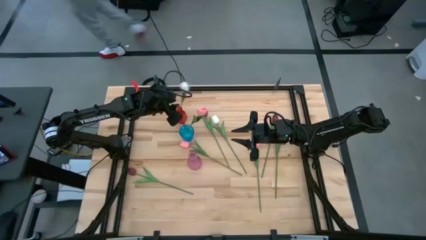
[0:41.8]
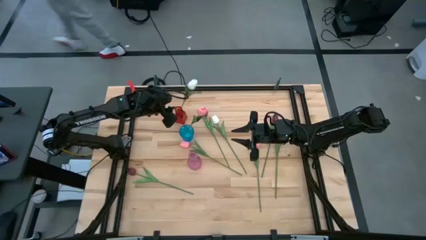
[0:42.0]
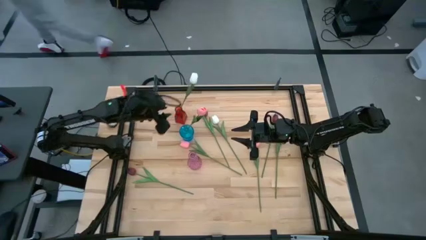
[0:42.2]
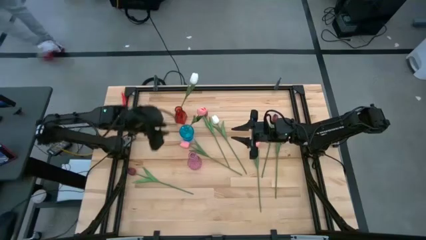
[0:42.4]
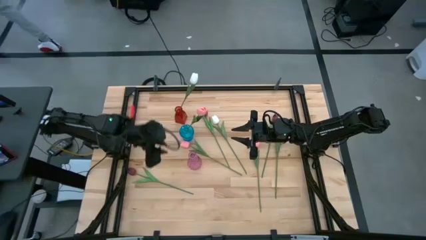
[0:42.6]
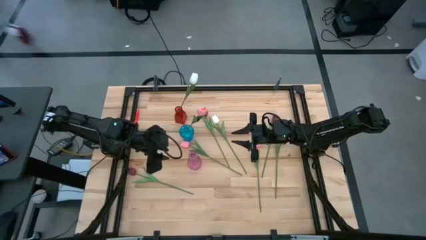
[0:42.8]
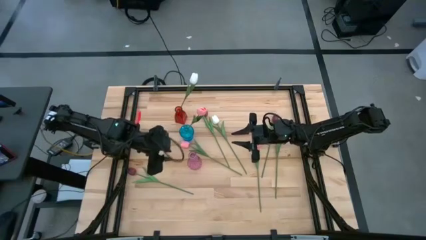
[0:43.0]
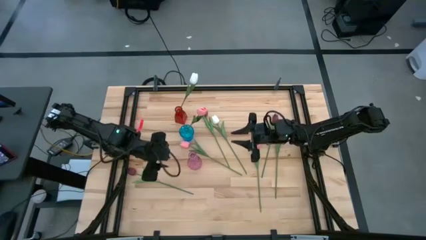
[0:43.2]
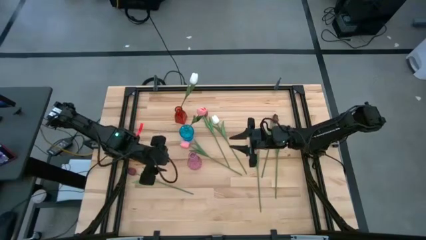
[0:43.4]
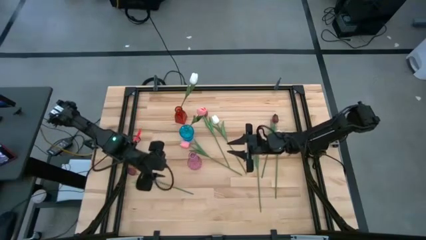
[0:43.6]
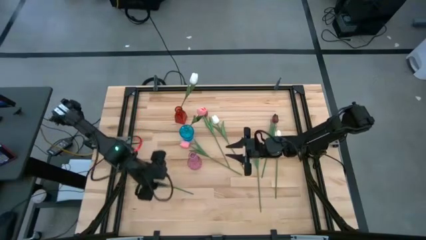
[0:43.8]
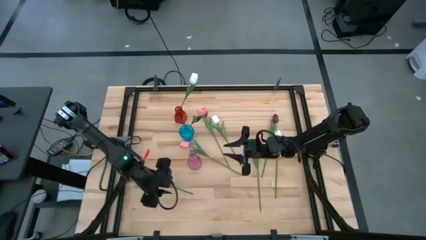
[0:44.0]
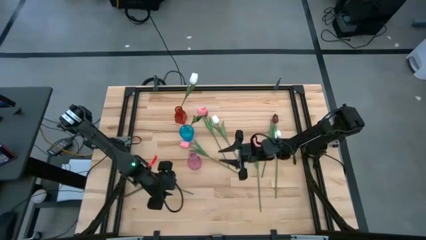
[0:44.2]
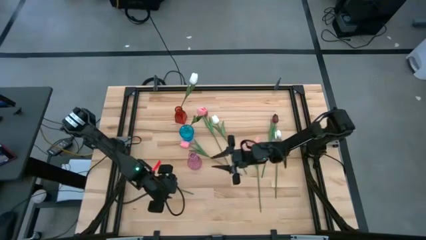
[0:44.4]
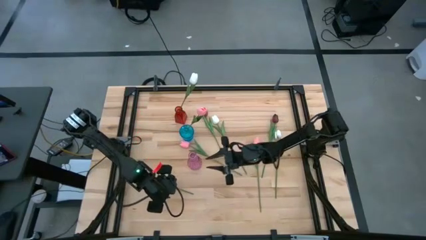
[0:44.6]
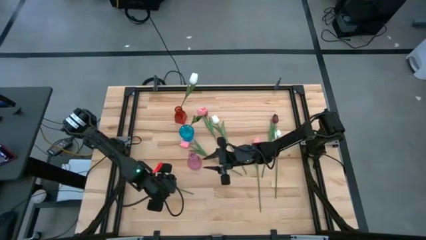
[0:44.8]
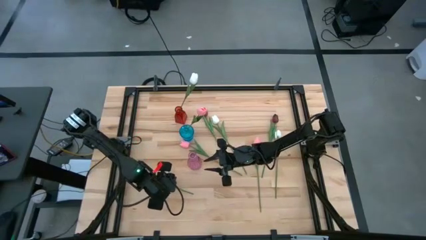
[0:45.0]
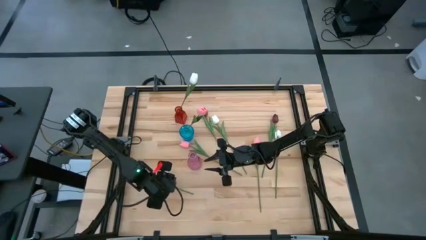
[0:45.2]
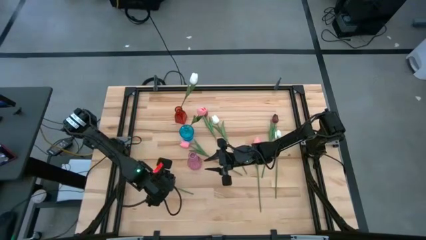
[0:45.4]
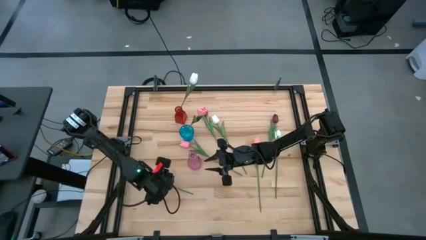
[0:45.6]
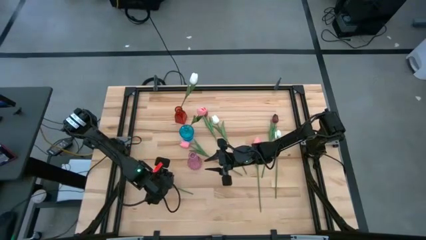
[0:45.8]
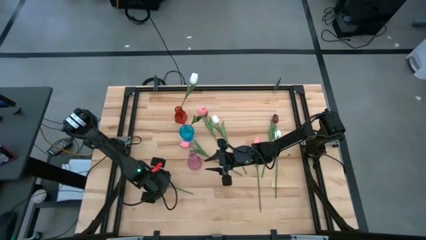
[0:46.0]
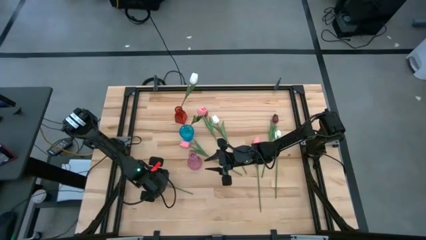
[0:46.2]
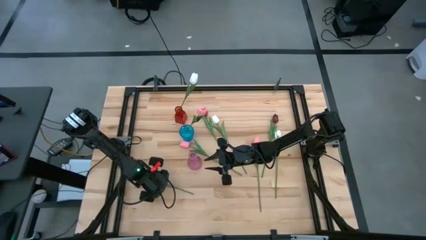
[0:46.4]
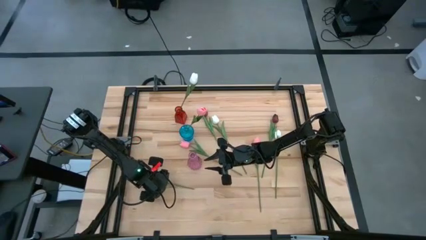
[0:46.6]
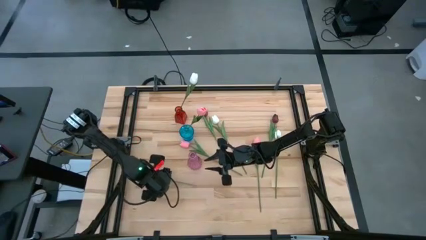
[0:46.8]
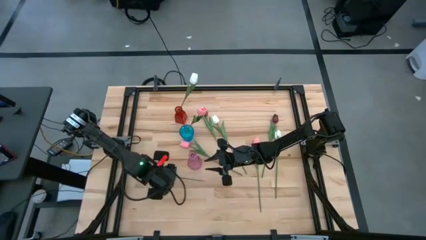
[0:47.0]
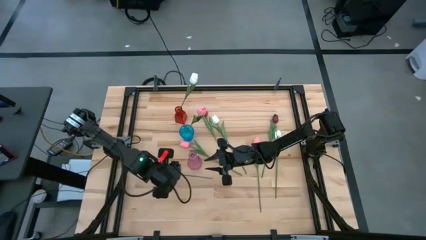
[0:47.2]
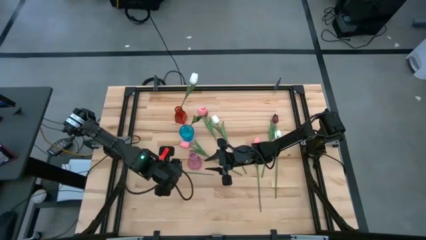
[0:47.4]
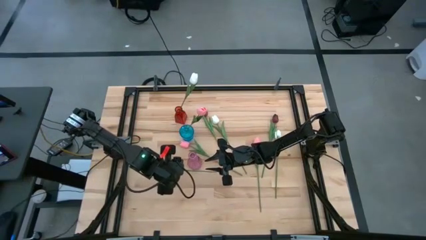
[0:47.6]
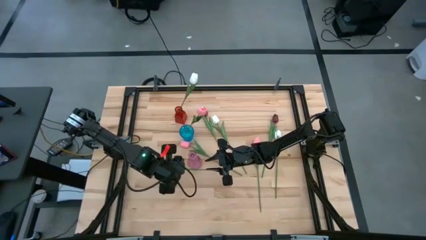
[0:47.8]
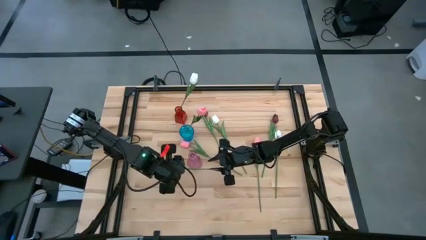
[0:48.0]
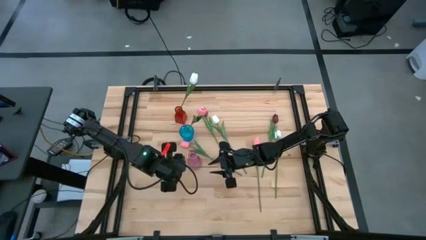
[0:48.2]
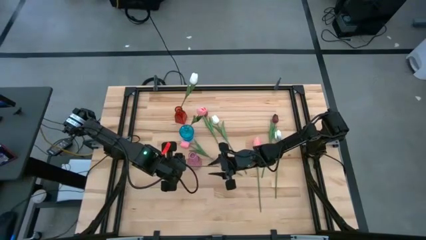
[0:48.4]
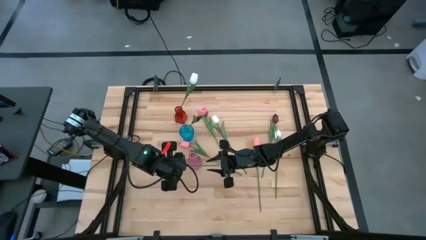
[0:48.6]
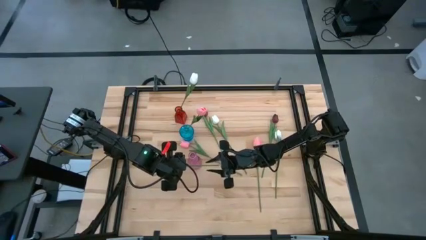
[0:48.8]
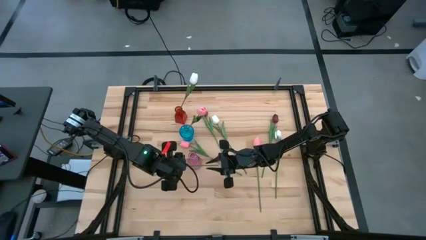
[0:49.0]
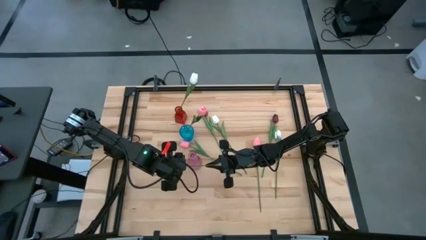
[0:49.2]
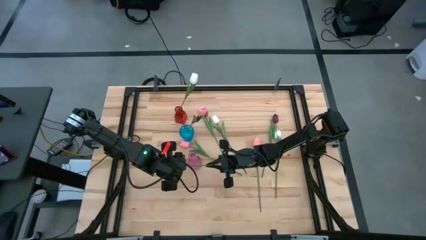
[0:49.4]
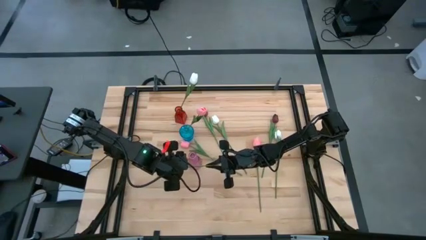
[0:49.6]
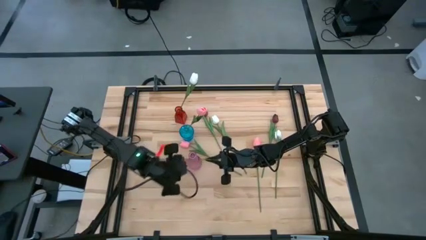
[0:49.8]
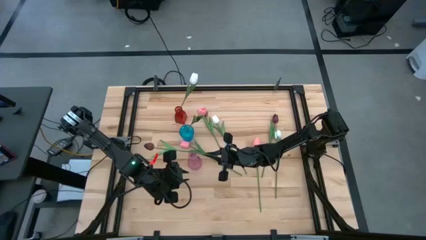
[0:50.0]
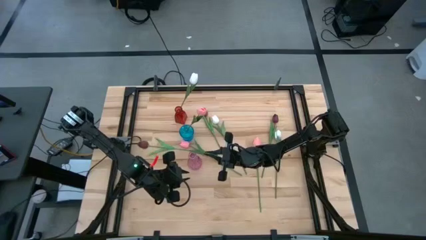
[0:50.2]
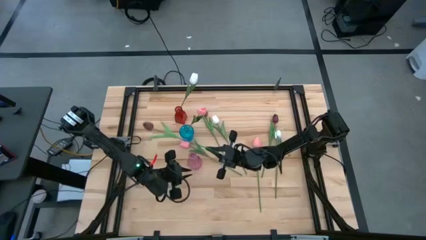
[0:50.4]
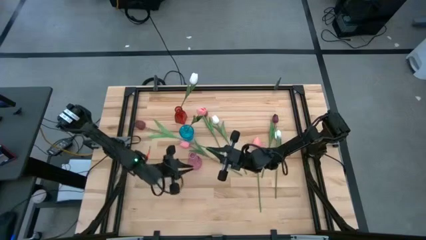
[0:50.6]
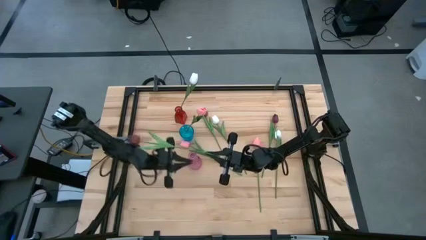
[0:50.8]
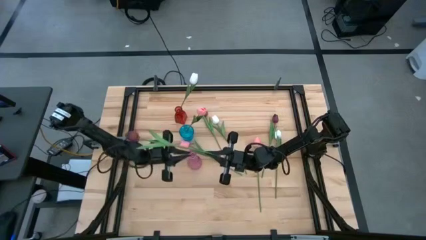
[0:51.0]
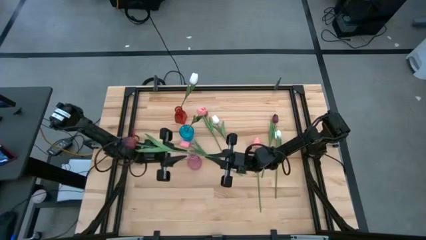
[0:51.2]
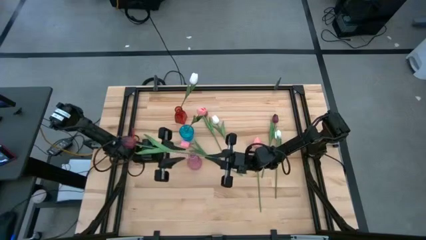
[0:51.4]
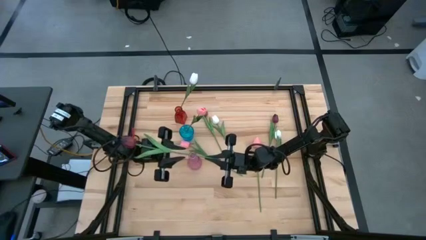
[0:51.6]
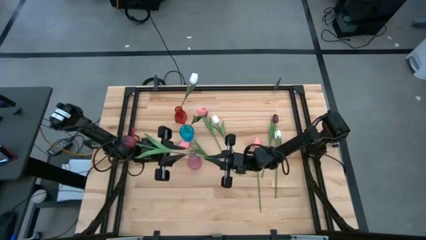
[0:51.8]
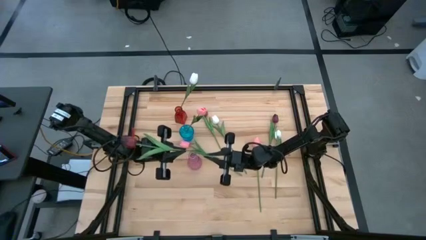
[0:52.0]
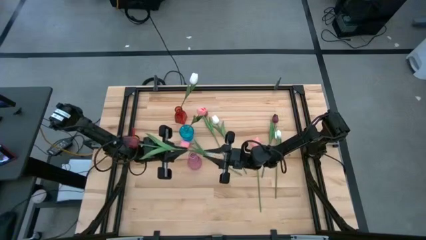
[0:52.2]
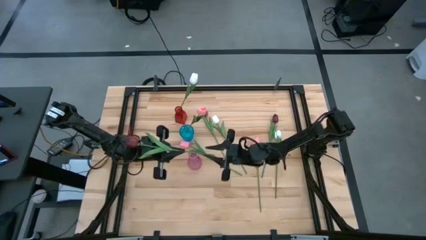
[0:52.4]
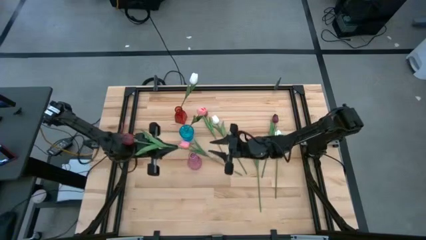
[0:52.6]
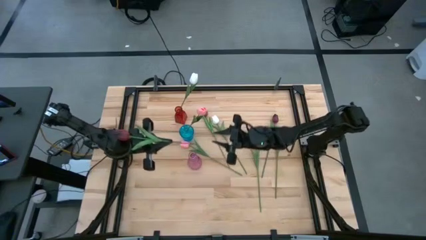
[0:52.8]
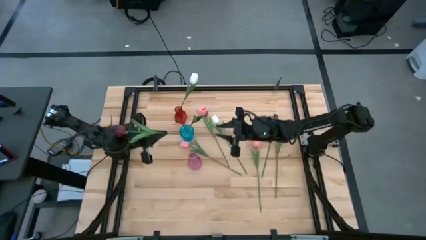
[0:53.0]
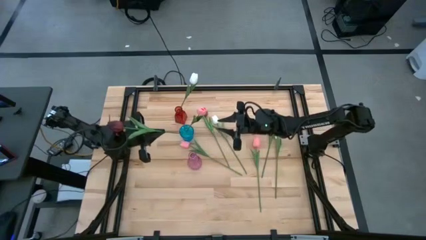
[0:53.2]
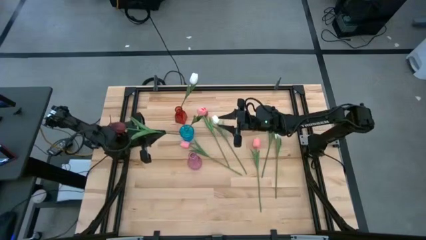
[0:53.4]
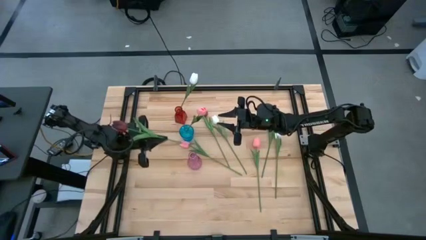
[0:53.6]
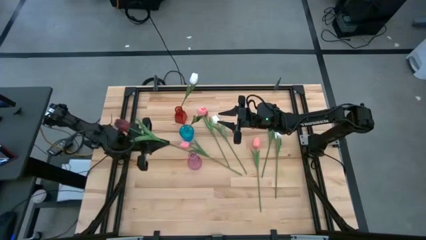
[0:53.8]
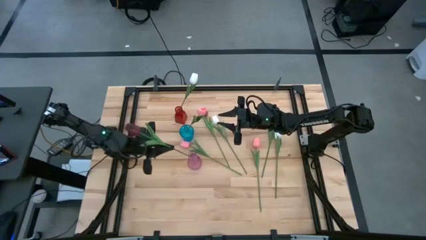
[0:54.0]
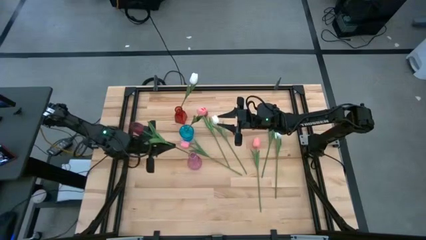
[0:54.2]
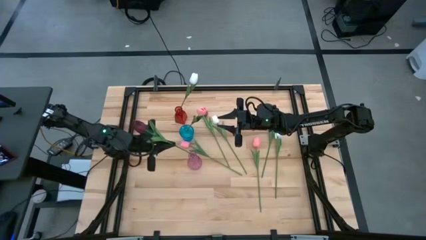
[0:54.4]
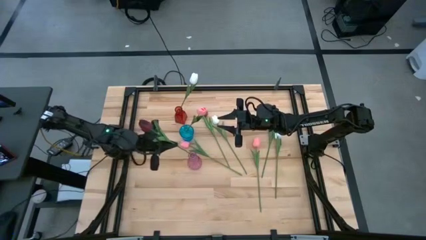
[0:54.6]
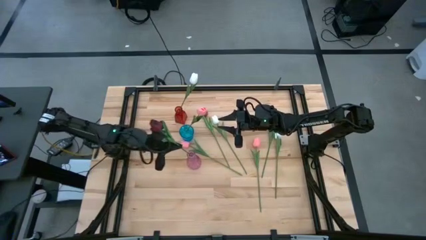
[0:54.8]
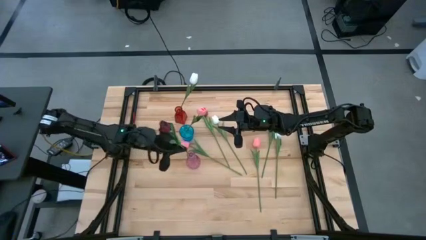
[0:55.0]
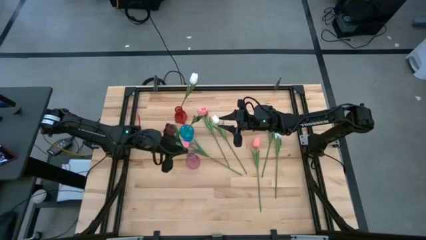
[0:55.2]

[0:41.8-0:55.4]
Task: Sort flowers into vase by color
Put the bottom left red flower into the purple vase
